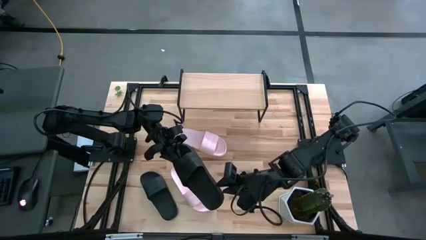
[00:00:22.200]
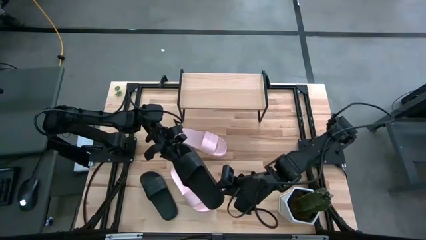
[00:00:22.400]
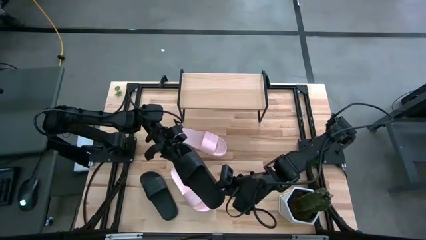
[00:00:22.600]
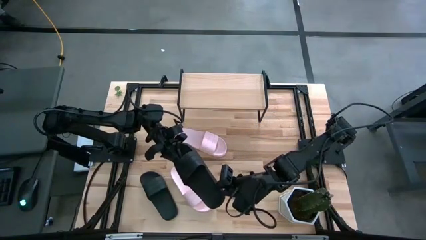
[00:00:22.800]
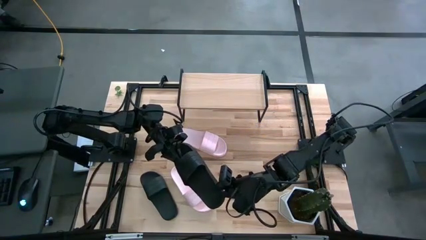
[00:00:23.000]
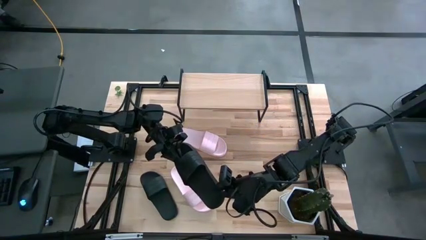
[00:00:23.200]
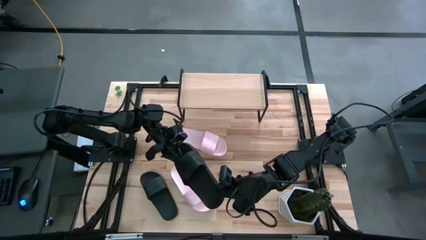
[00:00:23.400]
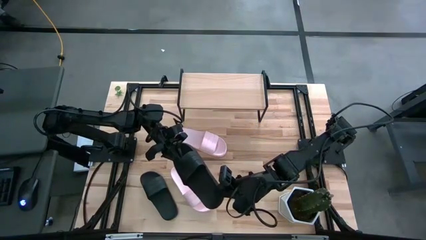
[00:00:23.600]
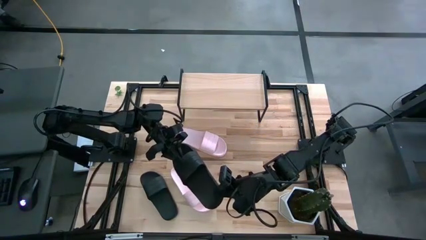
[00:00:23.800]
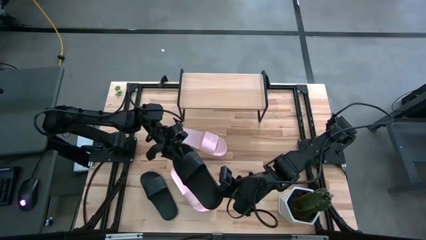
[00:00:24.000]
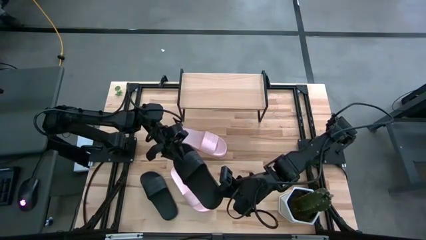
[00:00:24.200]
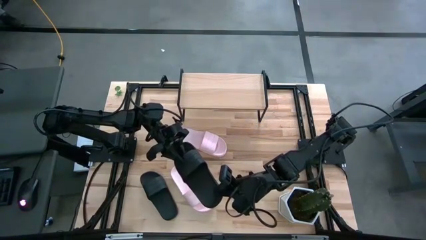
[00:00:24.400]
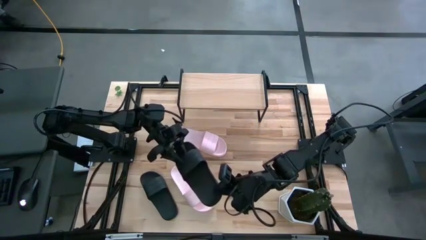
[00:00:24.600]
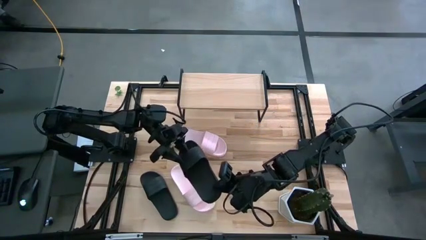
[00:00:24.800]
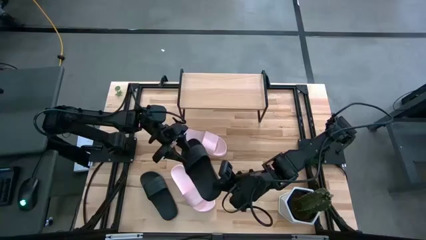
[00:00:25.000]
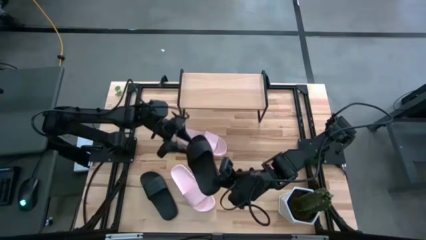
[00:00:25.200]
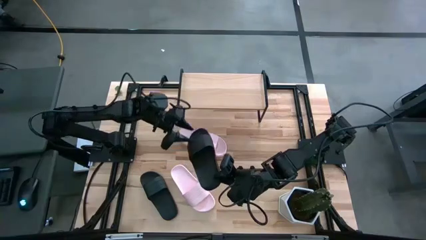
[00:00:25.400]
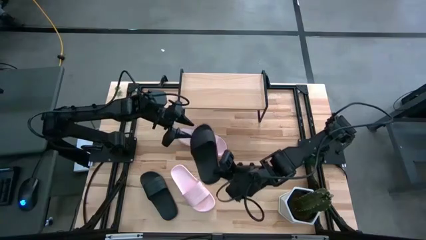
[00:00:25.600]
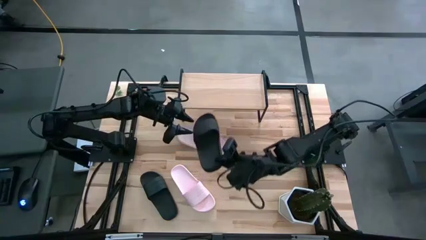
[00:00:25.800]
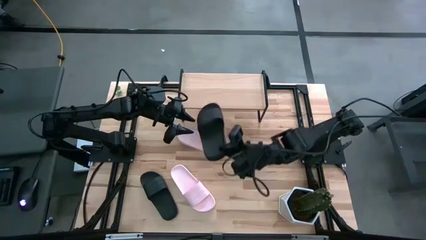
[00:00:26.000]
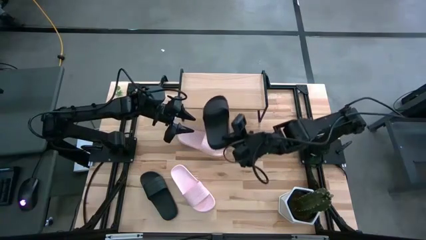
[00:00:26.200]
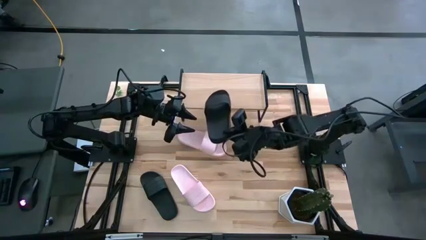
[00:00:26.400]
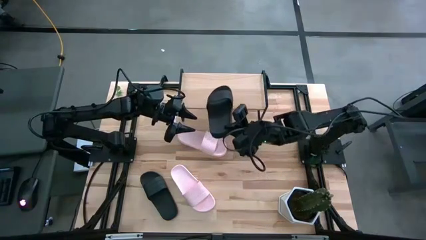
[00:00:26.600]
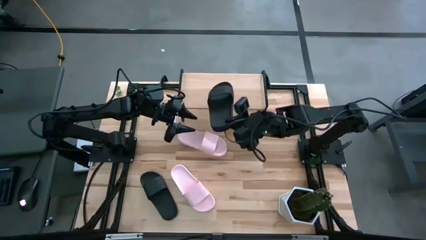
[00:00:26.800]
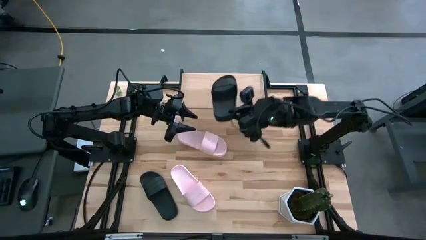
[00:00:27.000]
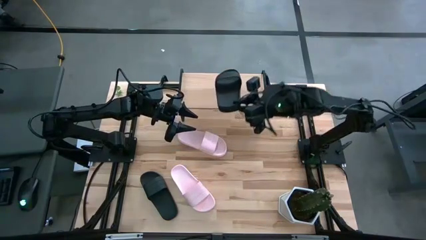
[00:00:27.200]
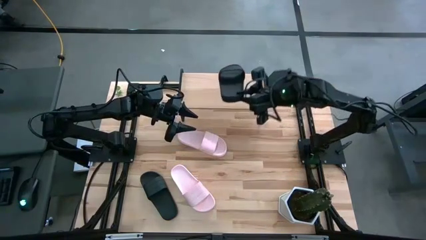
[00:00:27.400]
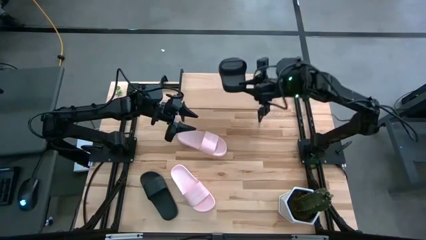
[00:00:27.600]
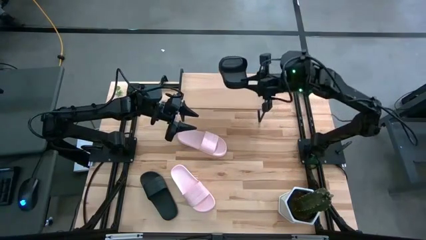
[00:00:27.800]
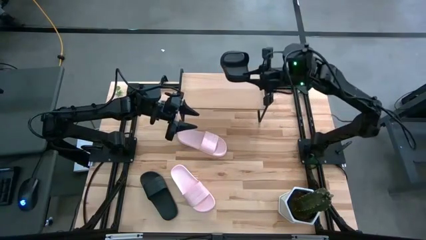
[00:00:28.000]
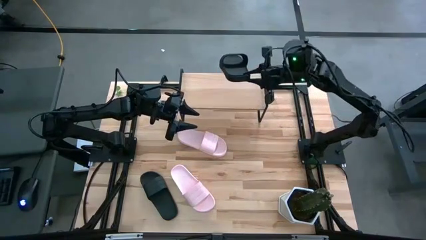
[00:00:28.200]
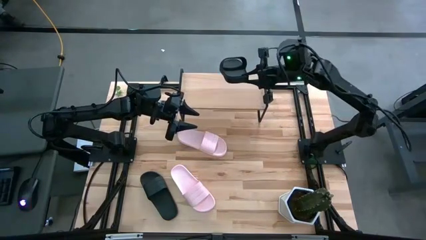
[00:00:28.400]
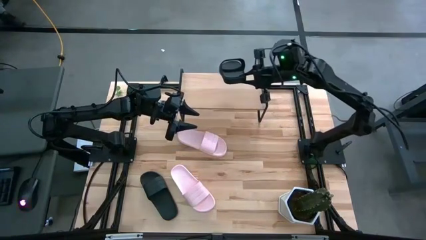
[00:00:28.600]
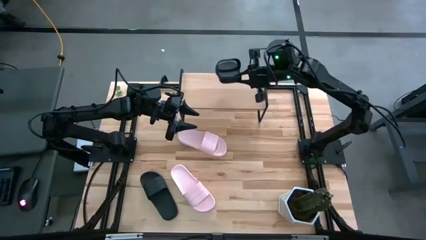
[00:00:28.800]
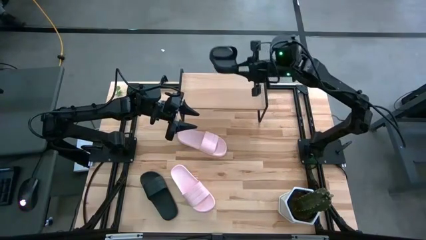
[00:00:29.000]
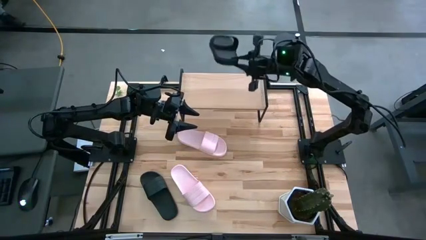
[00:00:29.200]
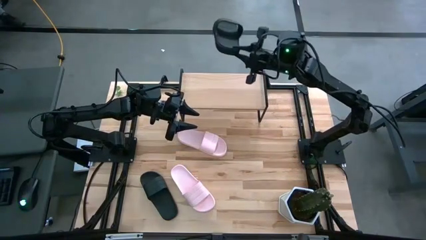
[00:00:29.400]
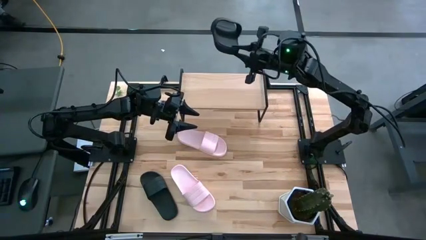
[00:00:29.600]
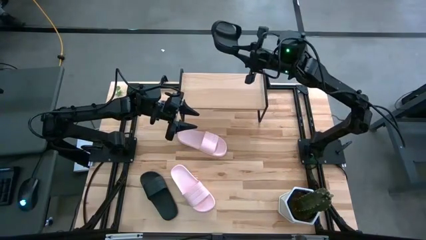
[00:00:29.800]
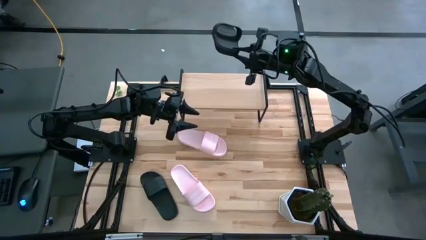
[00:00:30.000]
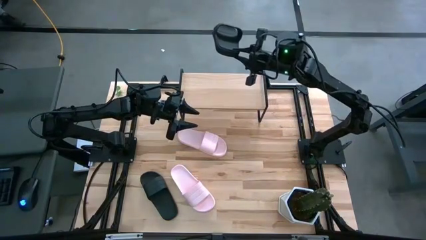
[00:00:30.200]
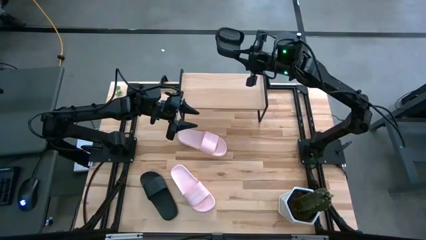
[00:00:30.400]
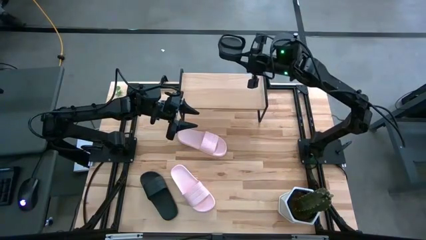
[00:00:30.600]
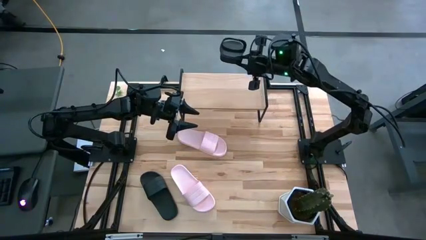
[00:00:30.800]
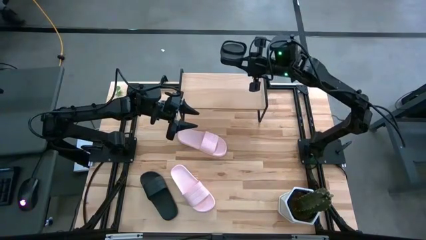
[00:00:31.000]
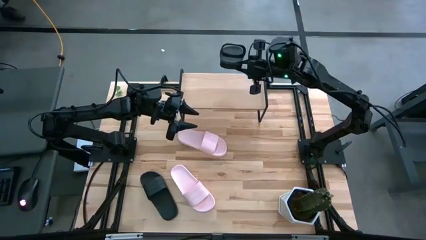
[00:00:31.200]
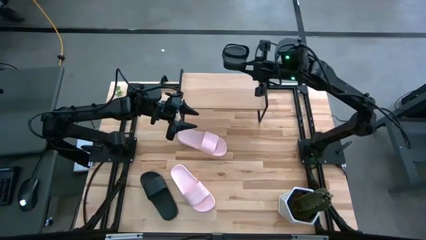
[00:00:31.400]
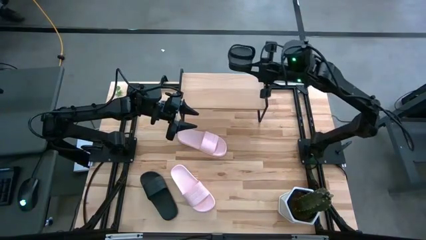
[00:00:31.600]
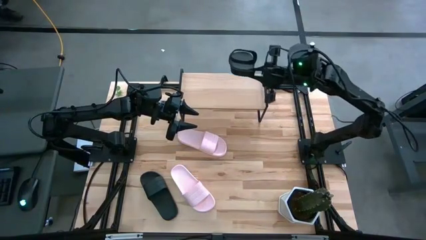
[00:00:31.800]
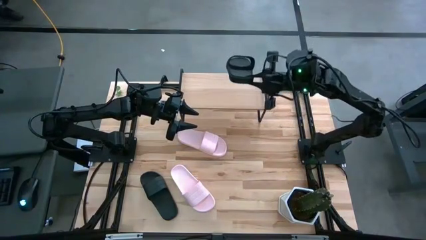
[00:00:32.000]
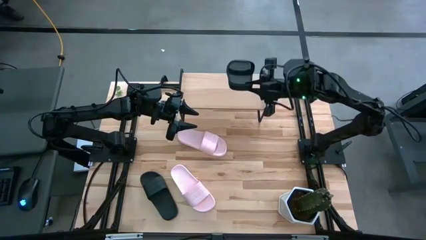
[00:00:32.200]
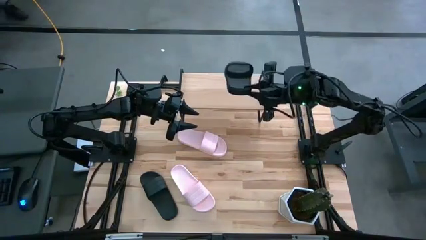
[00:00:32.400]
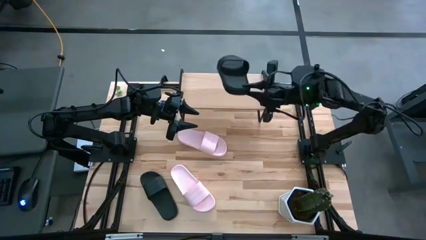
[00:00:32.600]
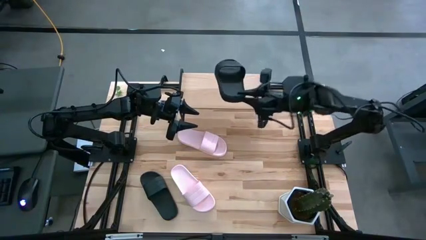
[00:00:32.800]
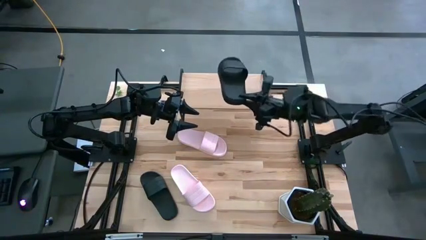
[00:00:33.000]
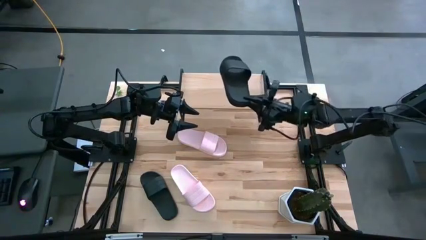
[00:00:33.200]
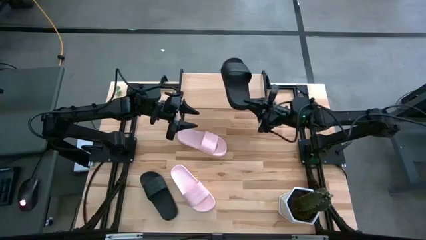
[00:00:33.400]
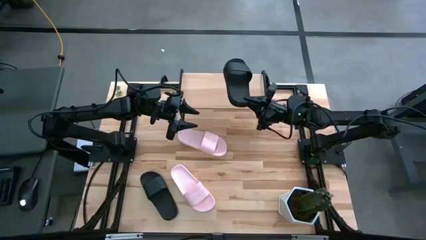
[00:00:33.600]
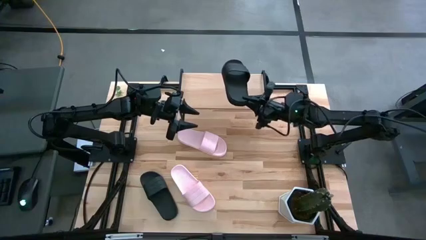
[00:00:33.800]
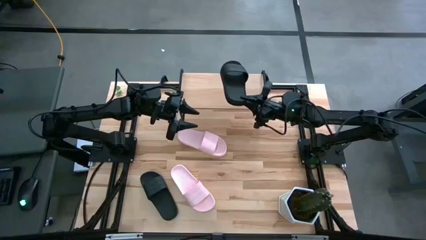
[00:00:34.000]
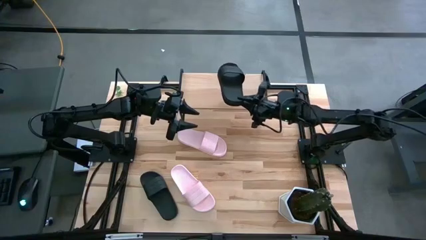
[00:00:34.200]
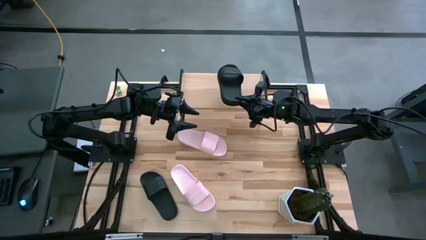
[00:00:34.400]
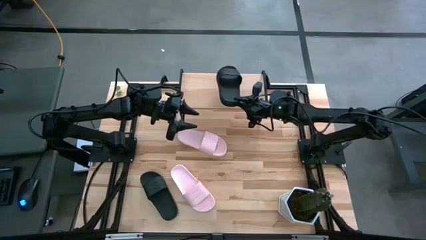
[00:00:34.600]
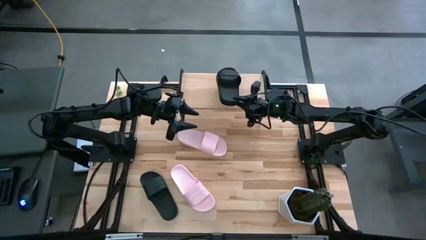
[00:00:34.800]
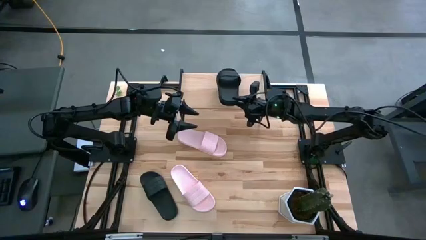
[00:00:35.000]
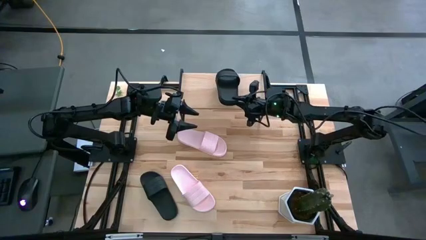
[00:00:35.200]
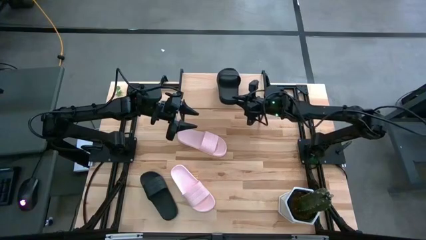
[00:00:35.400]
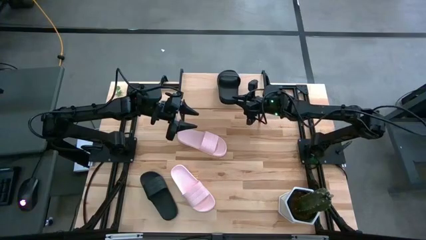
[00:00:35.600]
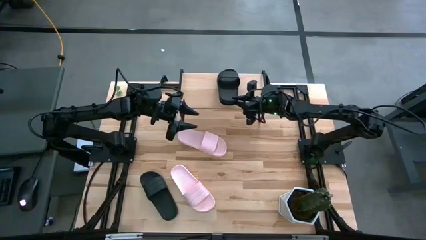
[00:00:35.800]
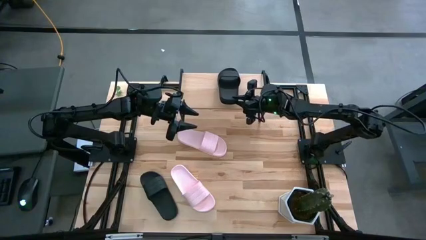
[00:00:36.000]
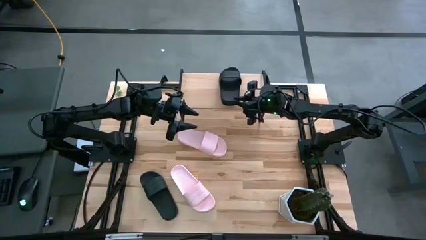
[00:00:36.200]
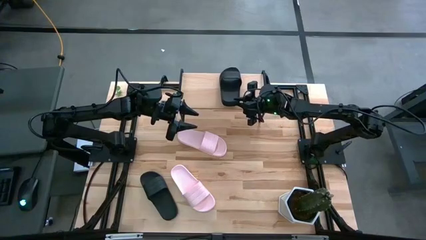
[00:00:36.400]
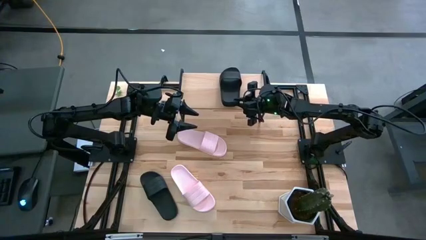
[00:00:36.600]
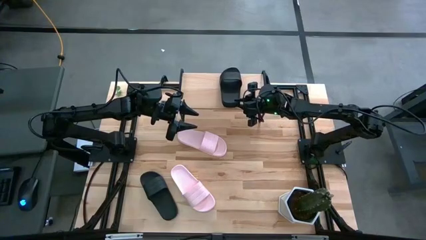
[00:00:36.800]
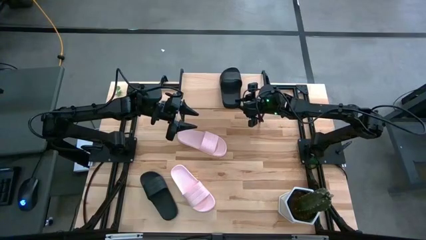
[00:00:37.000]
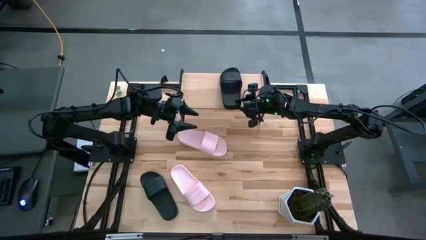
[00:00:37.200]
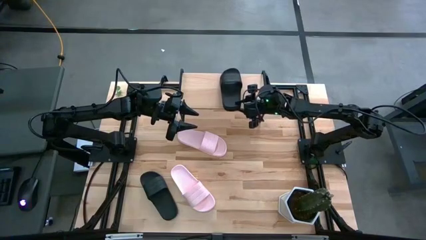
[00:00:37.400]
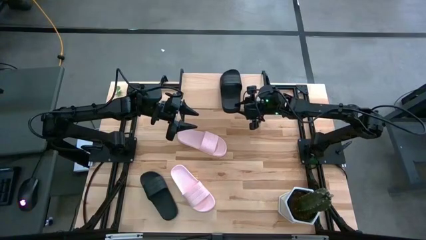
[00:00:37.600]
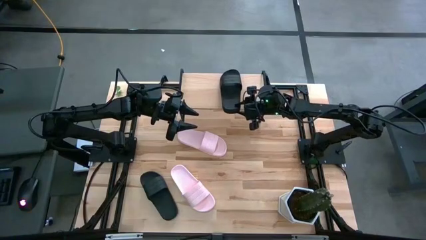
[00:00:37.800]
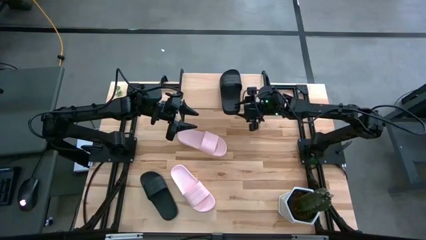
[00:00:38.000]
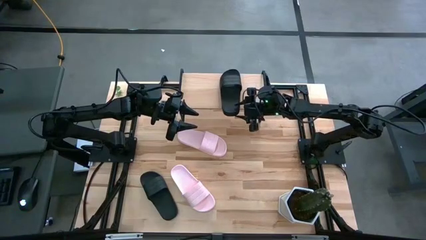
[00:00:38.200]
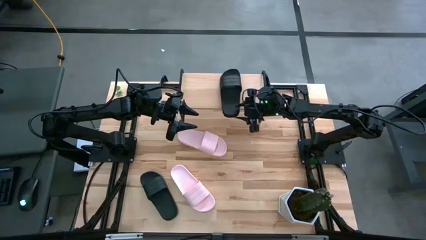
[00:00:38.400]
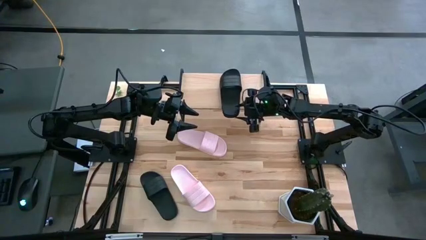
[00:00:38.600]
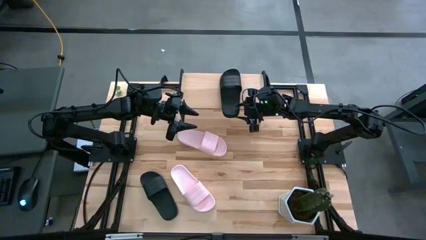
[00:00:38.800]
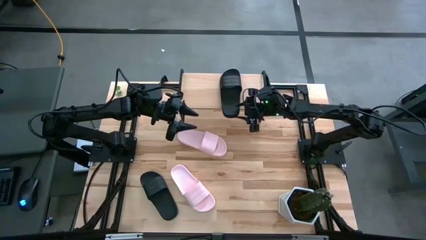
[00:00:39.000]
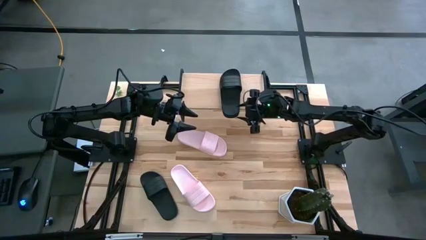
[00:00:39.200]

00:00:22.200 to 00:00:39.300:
Task: Pick and place slides into the shelf
Put the top black slipper on the shelf
